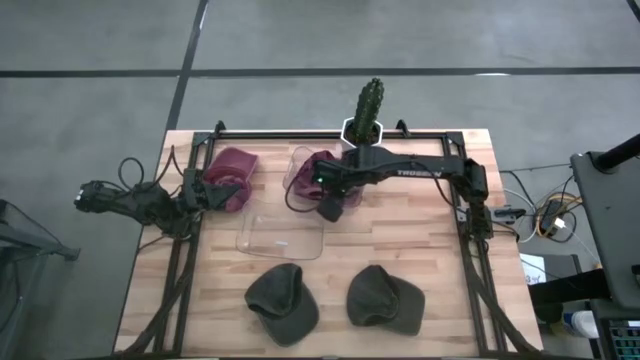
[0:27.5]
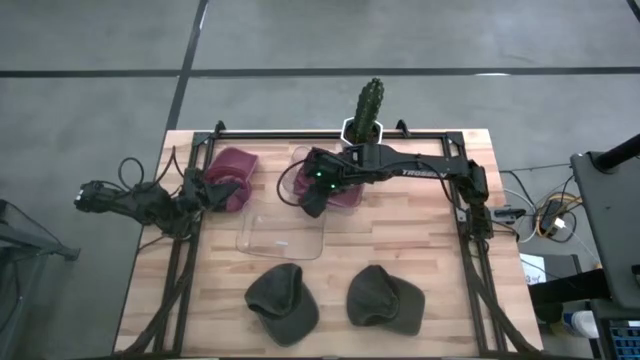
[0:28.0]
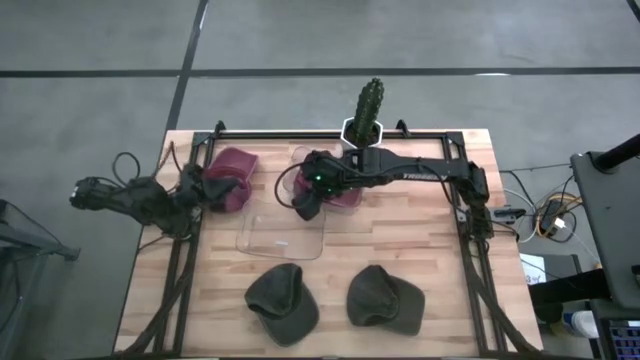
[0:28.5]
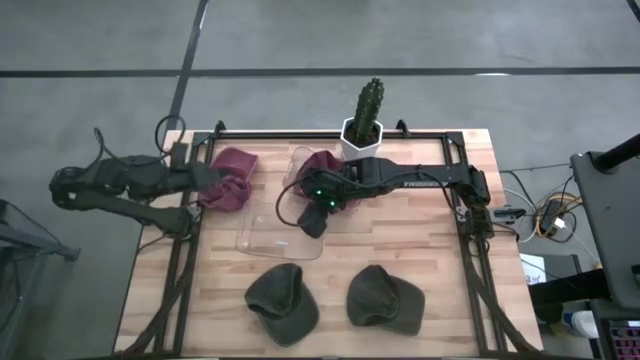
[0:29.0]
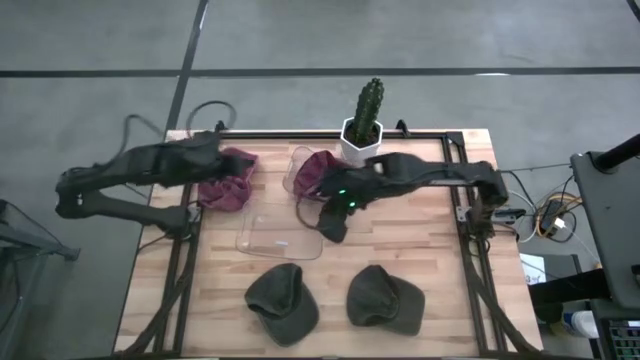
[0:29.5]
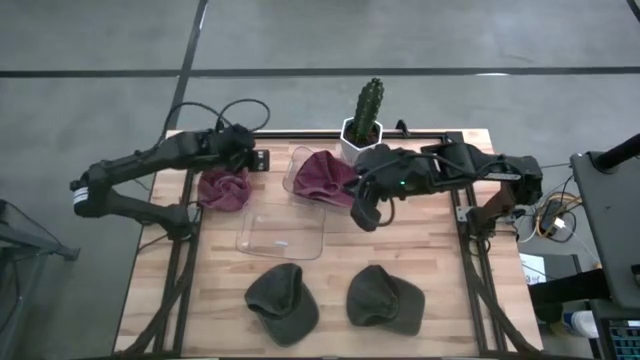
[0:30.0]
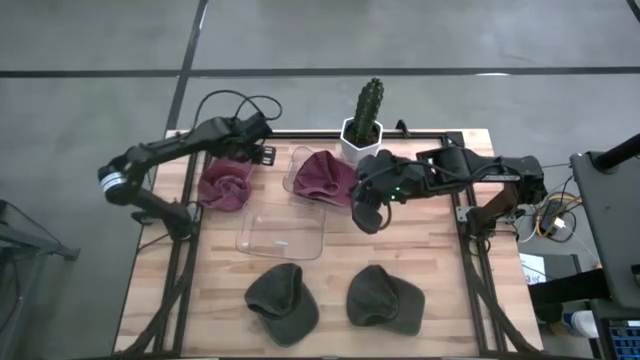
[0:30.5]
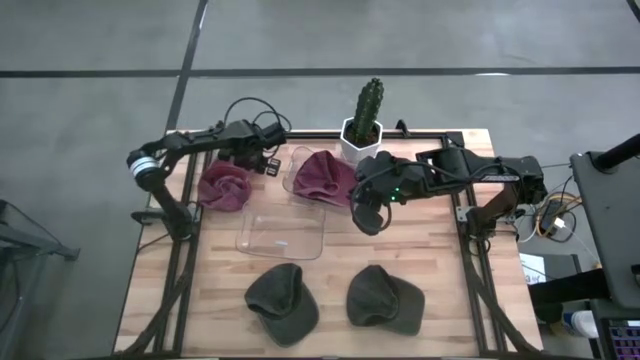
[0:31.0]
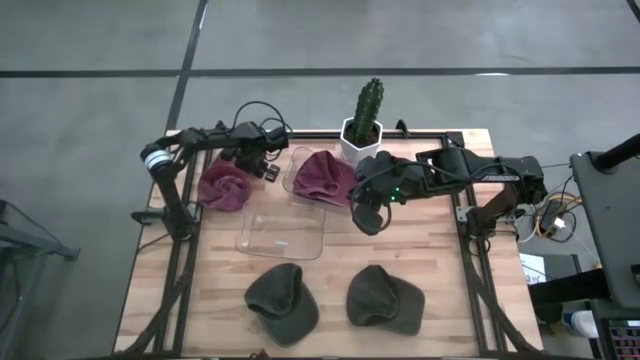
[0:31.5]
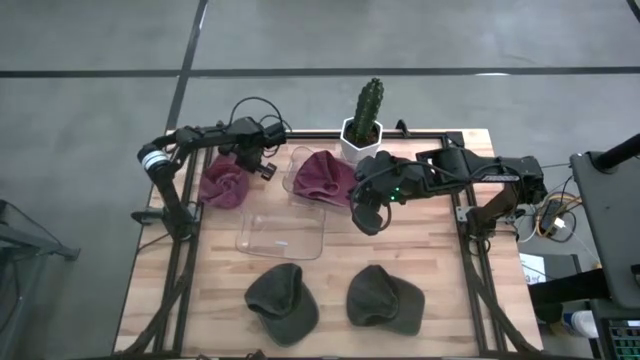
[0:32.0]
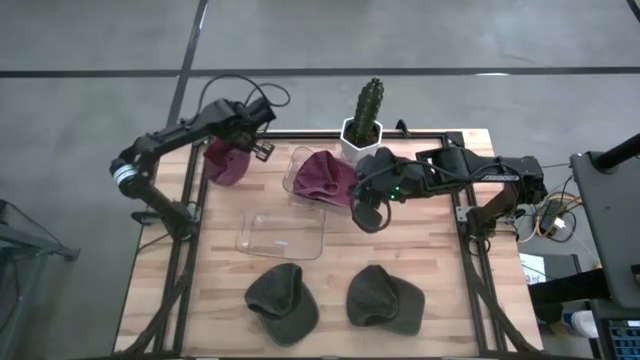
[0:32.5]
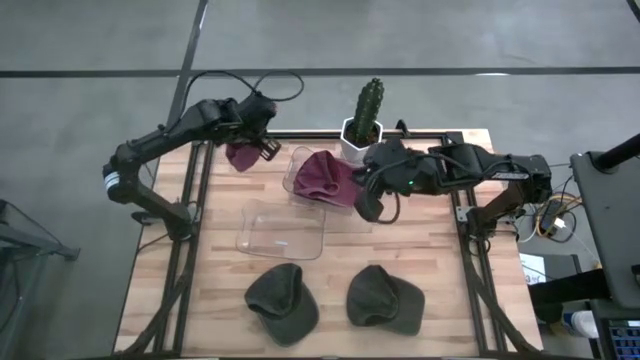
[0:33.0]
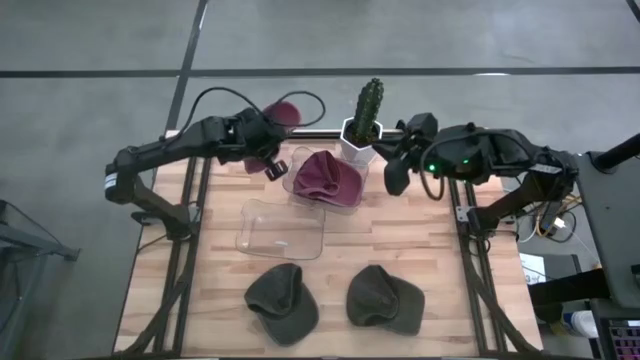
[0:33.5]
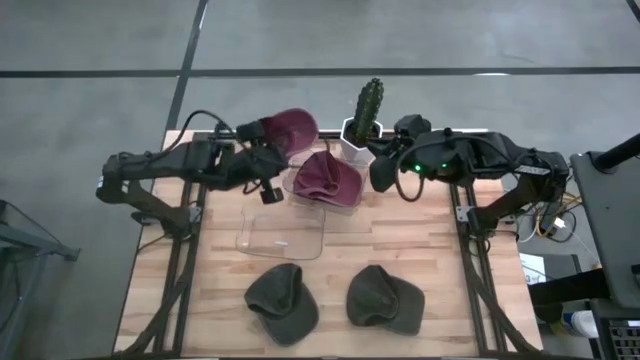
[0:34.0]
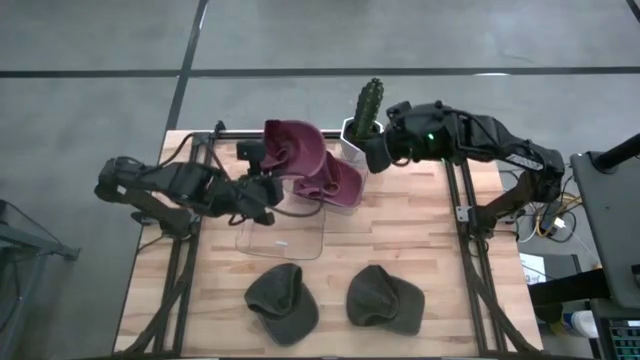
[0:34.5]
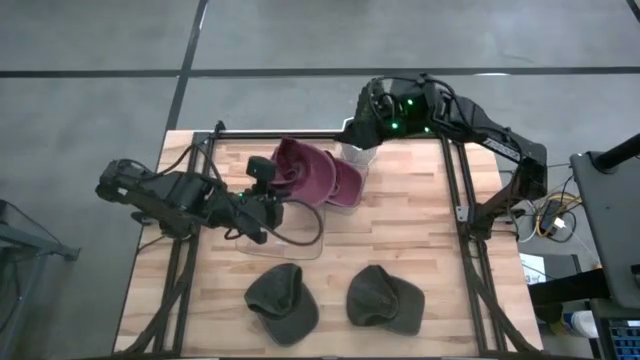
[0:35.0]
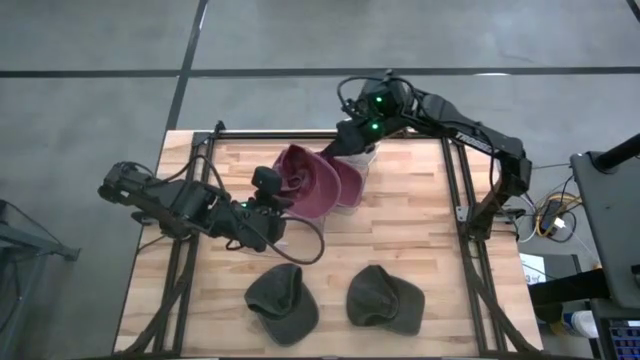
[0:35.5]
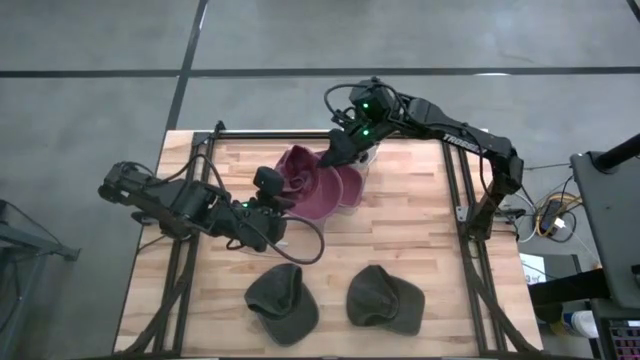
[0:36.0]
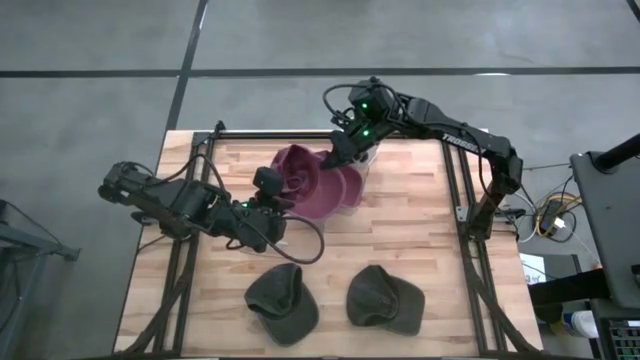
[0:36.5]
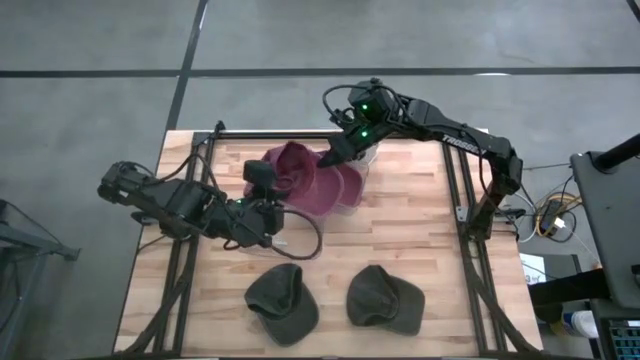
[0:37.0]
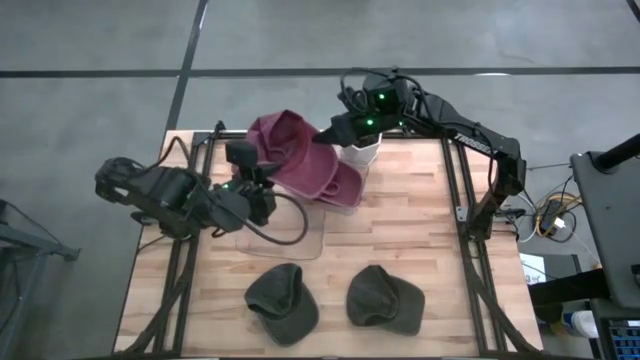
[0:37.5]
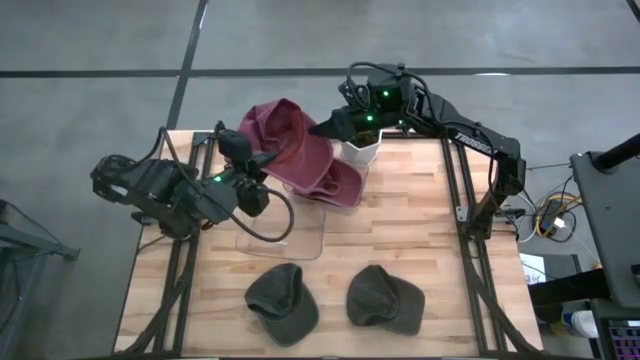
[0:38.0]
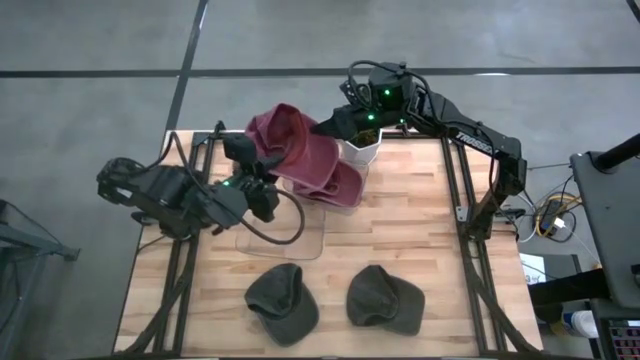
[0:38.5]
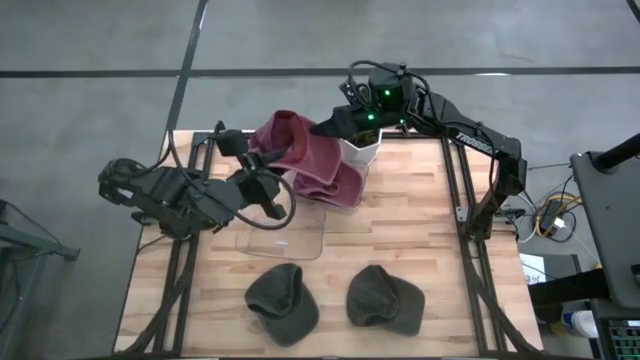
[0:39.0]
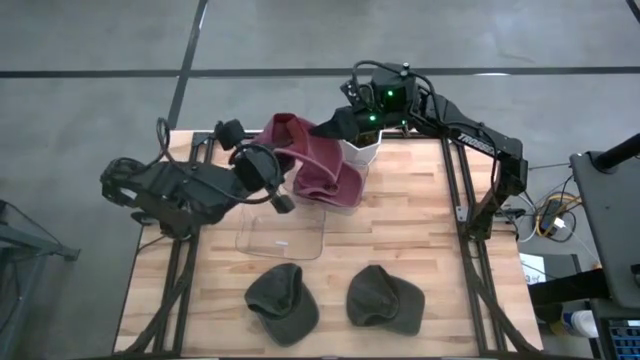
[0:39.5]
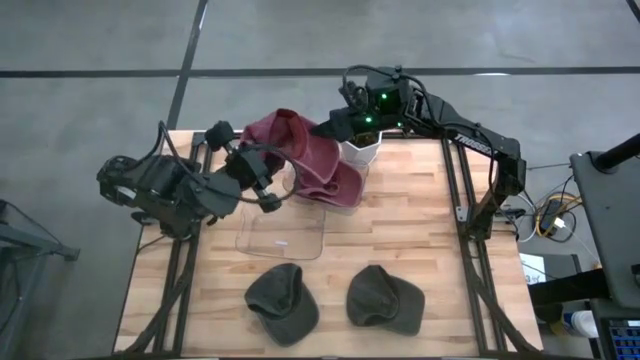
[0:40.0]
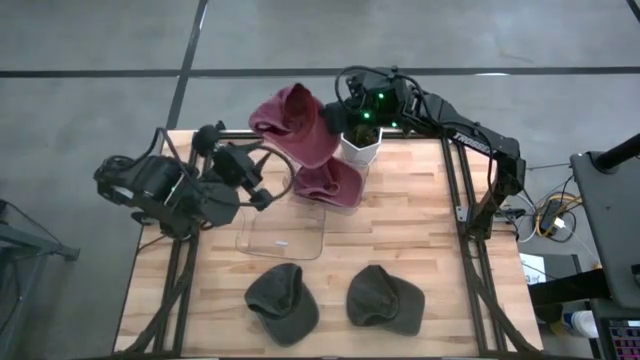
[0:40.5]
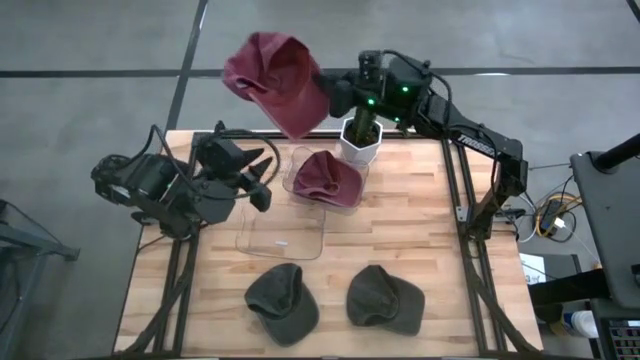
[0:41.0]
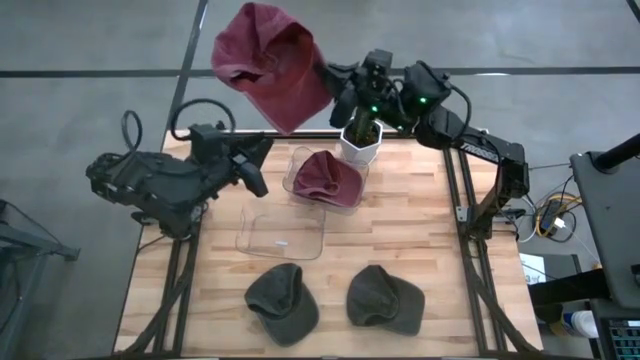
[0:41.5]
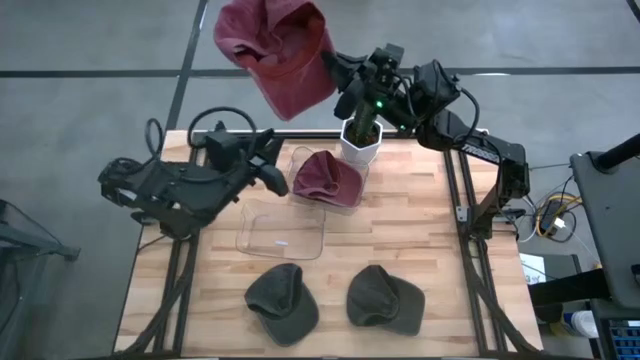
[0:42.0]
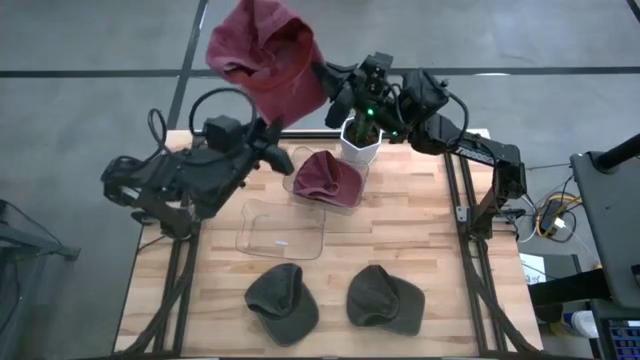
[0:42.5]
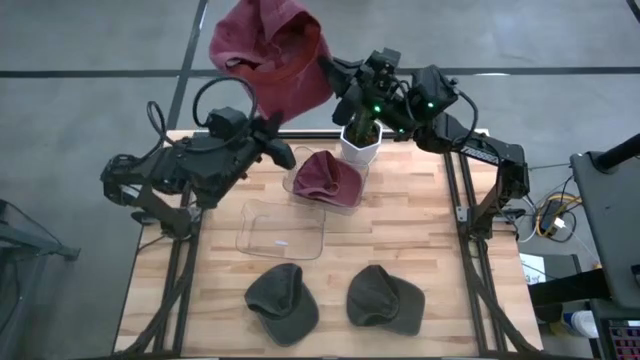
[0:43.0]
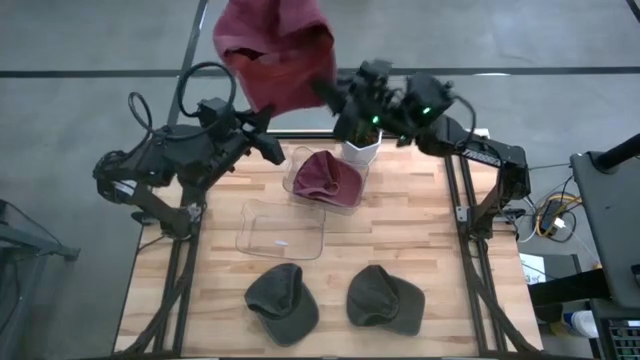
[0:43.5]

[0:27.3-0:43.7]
Task: Pick & Place hat
Put the red cap into the top transparent bin
